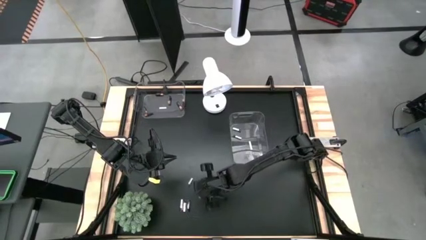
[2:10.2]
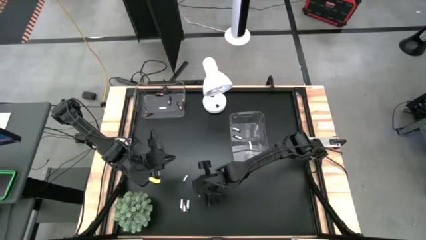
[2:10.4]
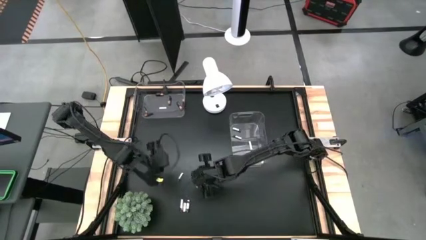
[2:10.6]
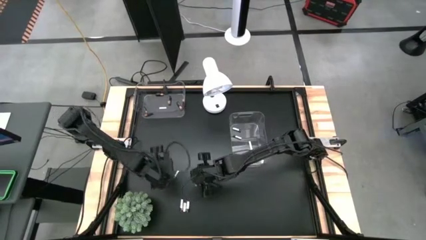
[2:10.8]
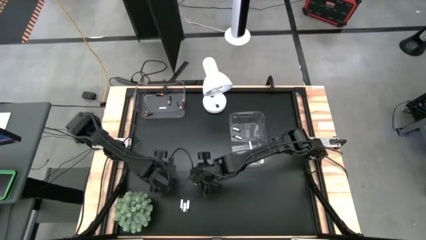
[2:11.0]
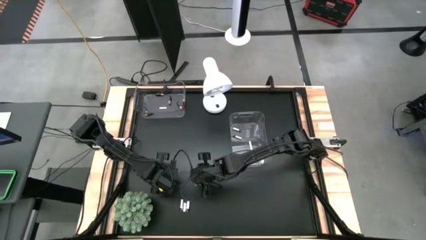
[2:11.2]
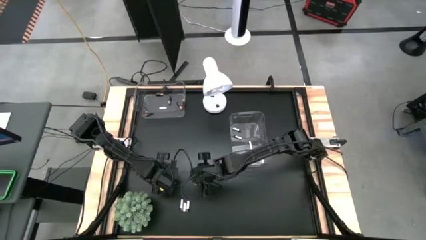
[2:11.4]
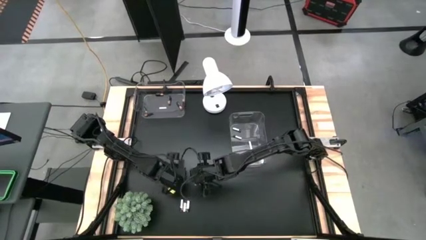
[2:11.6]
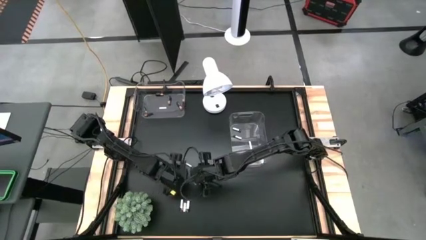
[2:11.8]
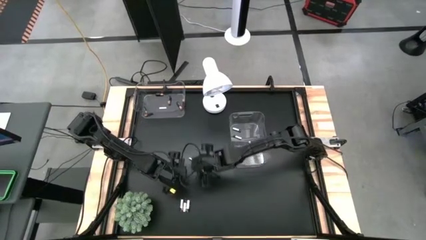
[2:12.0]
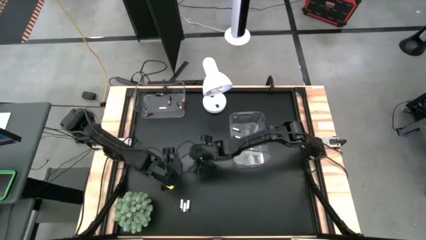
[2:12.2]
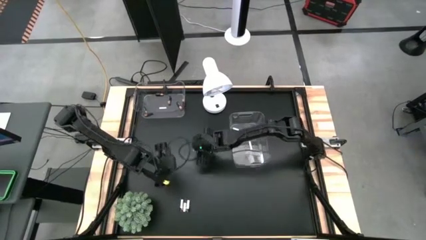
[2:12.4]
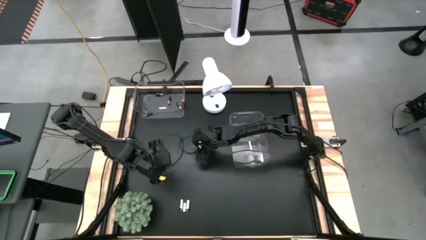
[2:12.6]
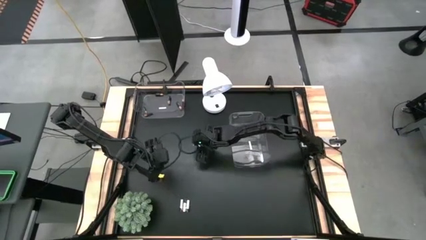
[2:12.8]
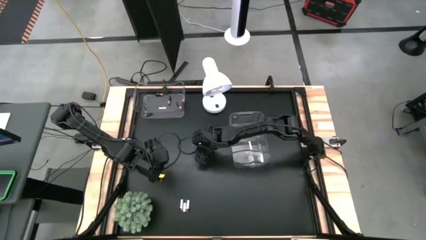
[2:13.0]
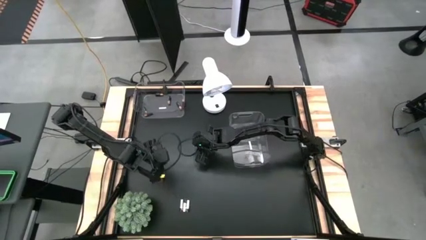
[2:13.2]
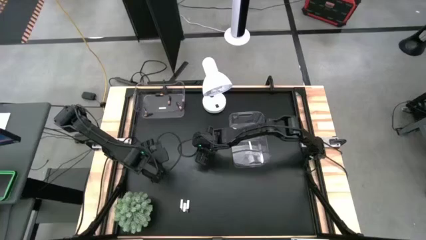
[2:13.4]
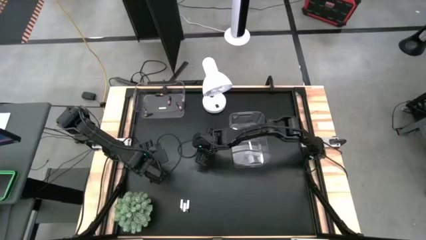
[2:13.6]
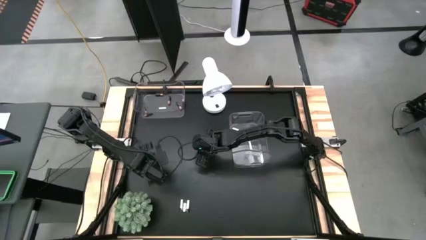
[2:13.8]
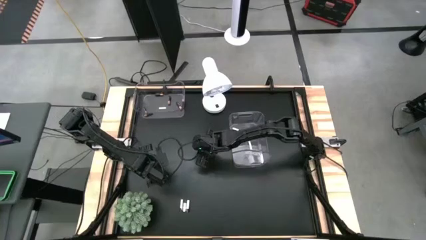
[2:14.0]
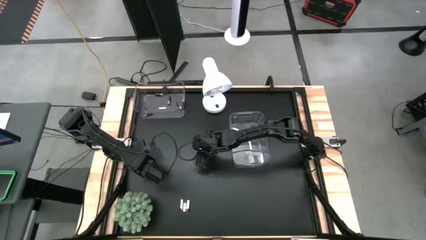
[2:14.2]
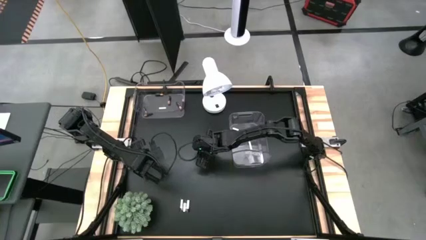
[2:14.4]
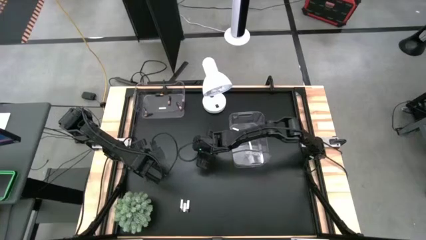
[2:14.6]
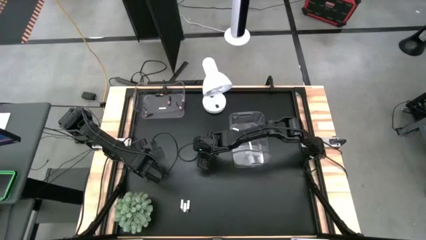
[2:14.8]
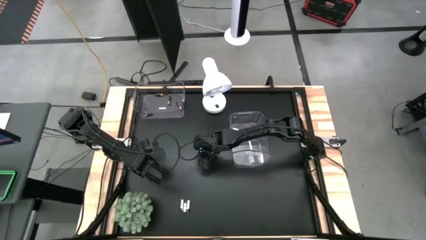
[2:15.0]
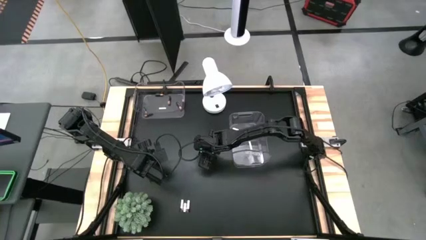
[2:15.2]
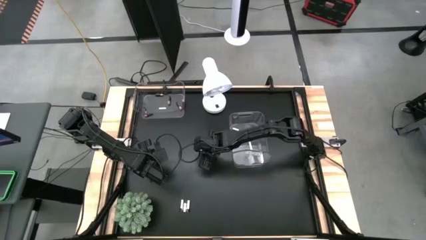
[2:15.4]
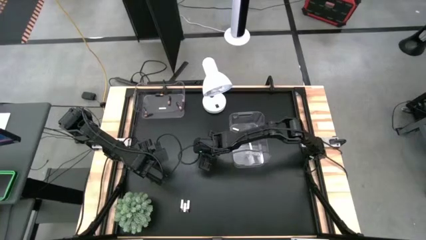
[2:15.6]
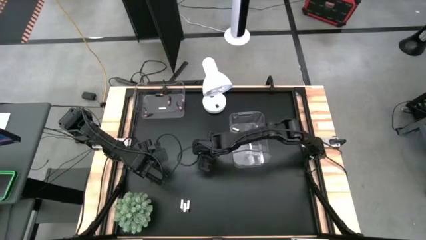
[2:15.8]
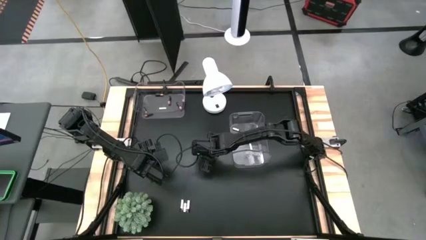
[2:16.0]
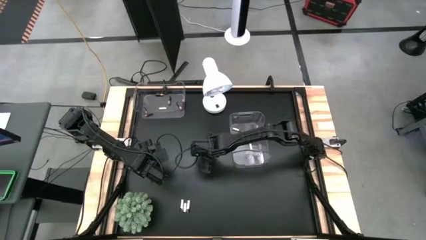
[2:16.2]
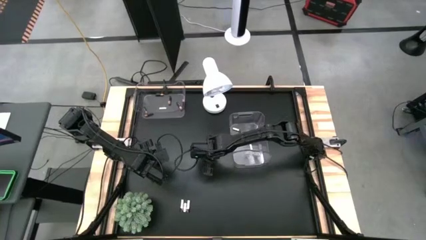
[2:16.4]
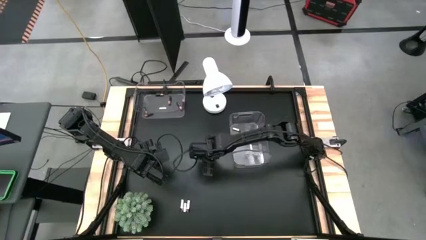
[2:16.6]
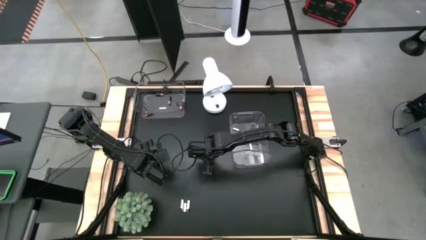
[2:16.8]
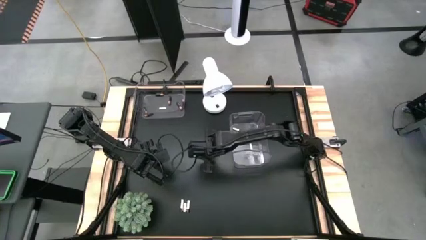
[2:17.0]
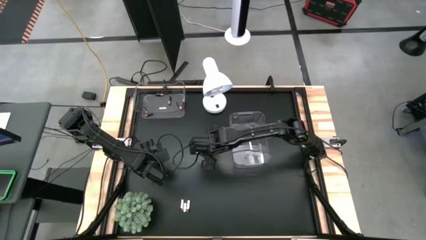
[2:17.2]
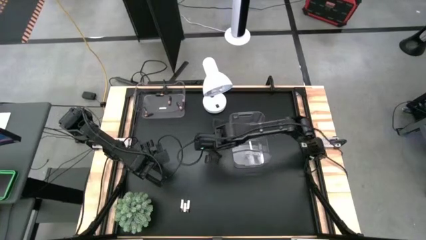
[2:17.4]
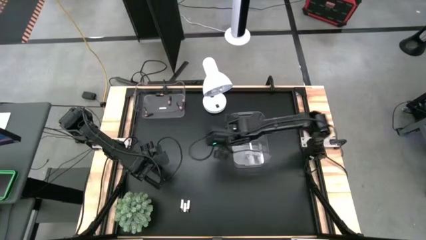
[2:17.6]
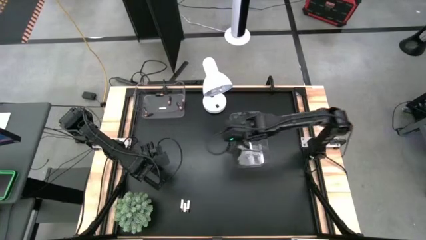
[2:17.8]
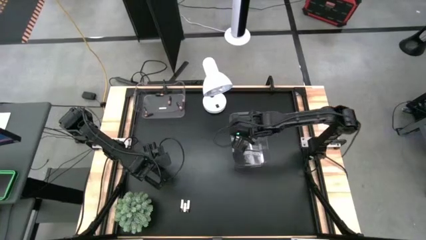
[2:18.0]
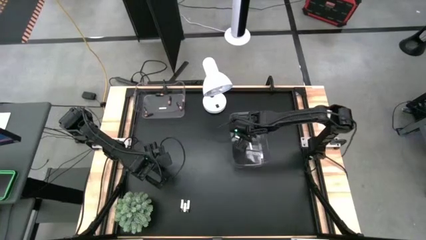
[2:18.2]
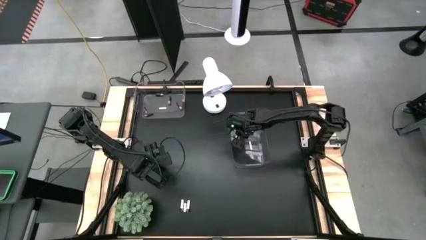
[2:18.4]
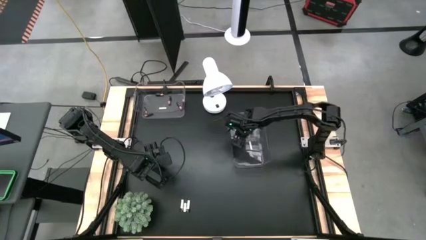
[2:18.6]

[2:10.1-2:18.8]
Task: Sort batteries
Put the silver battery into the bottom transparent bin

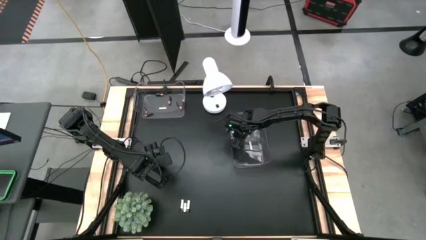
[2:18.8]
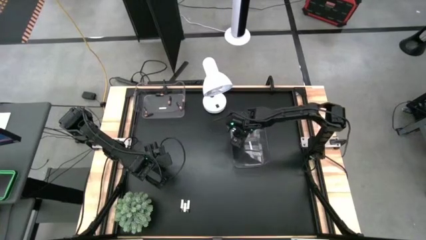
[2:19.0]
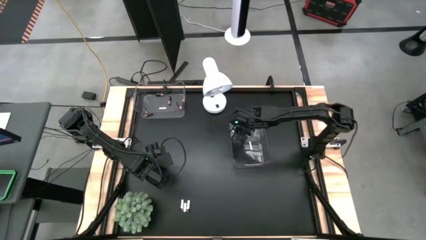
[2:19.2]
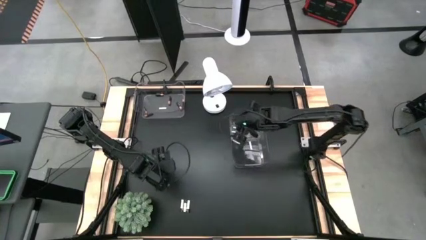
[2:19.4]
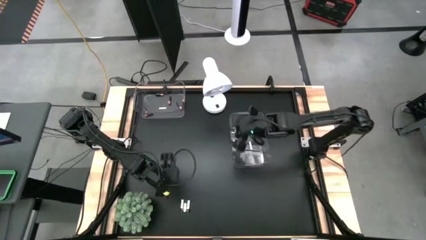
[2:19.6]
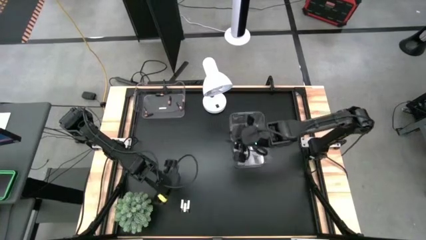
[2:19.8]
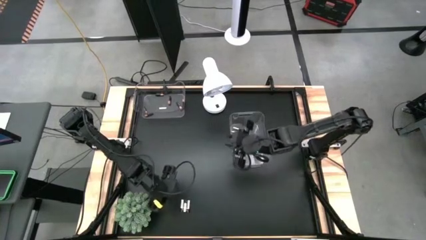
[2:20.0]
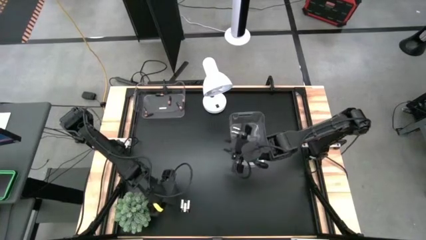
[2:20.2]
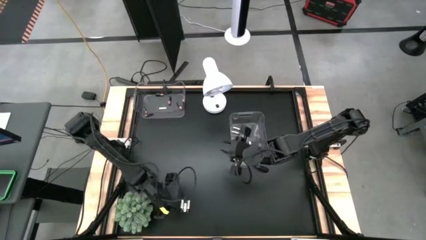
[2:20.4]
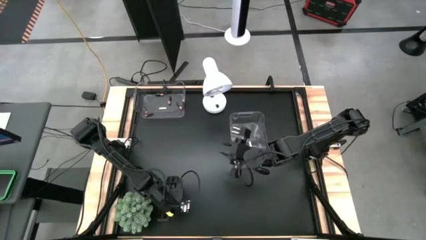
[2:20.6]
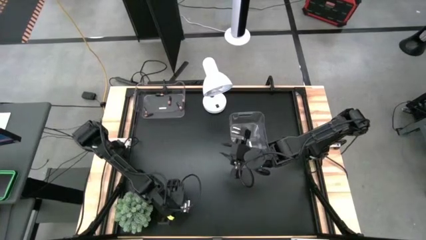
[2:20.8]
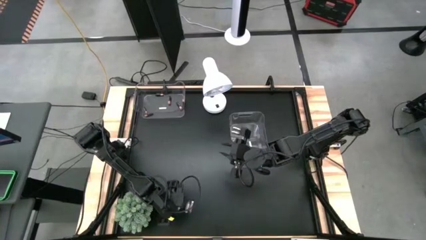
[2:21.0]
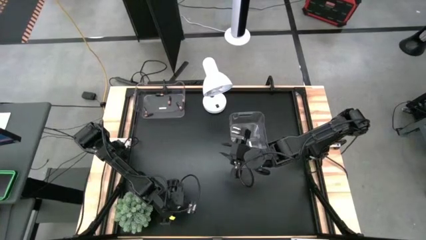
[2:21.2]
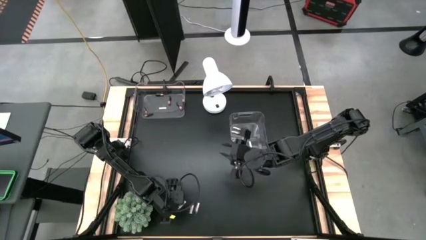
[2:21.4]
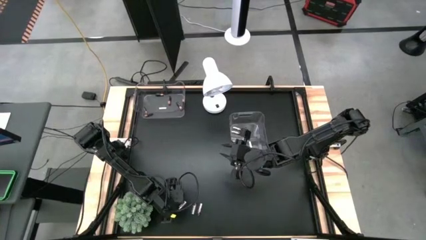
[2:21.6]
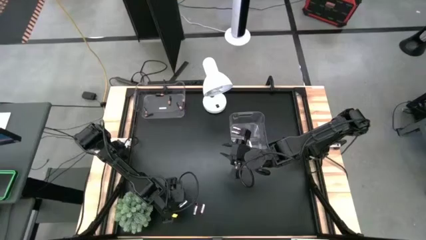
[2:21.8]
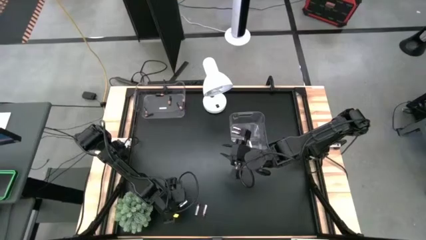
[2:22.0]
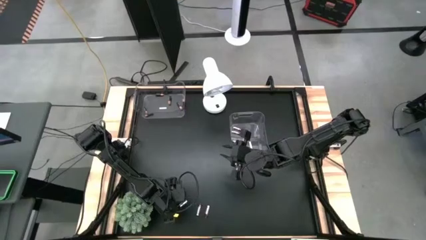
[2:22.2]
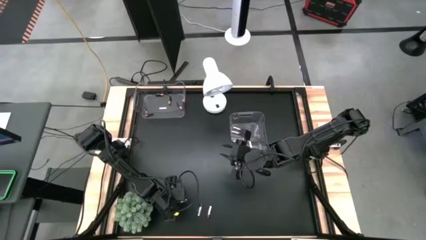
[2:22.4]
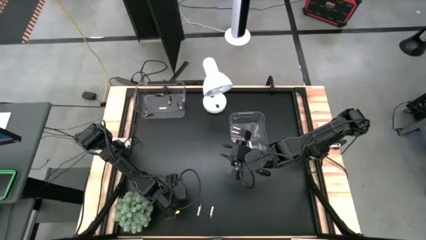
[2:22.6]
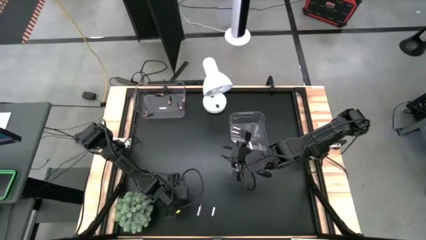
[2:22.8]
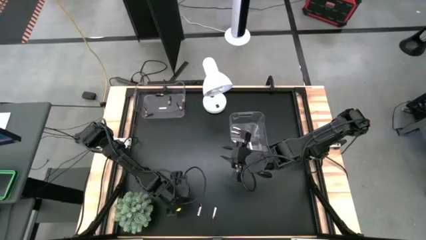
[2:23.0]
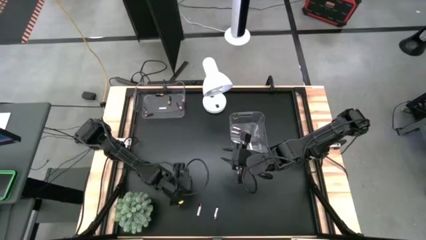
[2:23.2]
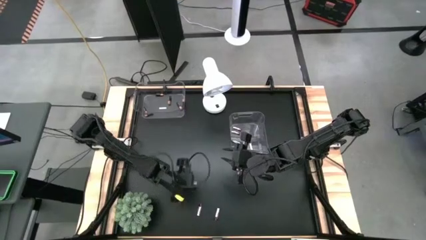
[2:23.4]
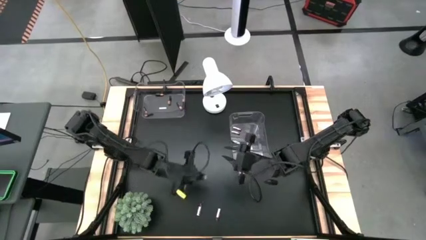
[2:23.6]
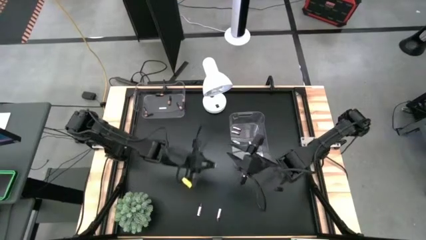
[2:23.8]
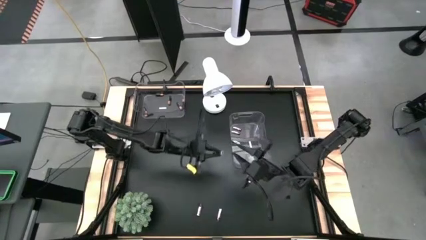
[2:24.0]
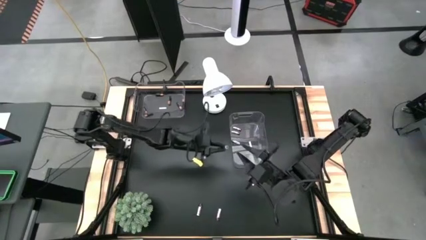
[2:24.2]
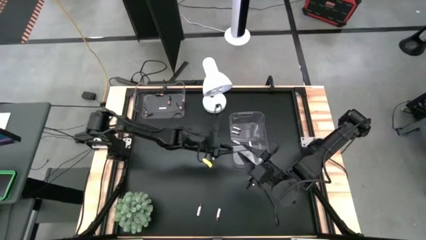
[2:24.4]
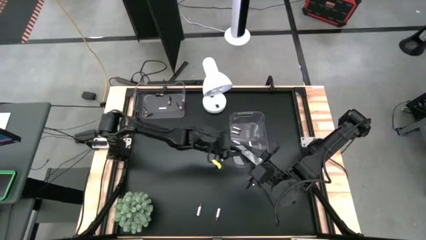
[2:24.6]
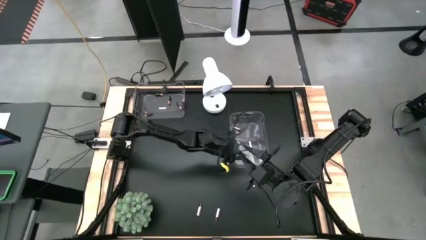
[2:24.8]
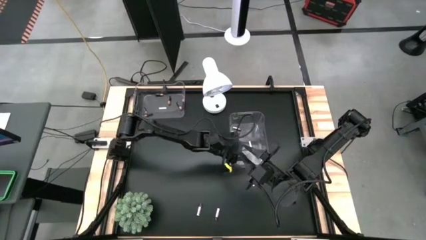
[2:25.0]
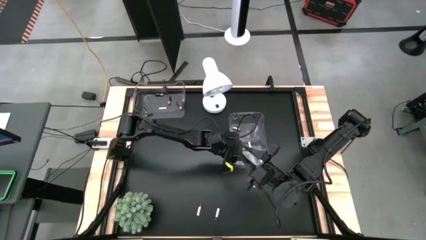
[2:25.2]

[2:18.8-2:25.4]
Put the silver battery into the bottom transparent bin
